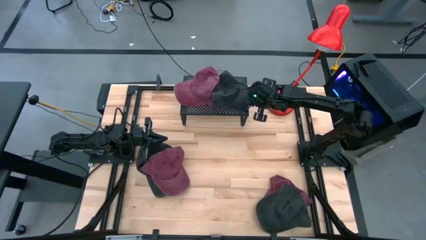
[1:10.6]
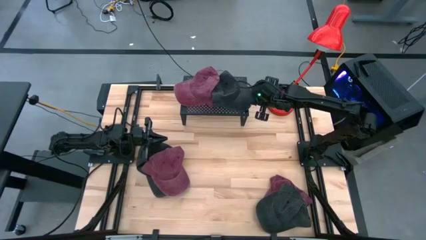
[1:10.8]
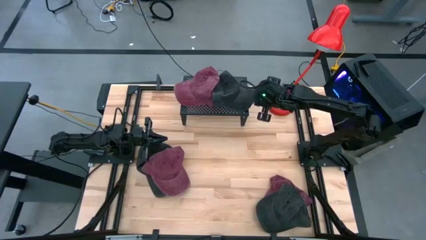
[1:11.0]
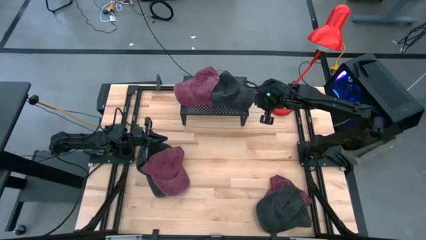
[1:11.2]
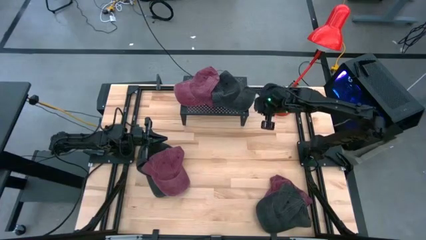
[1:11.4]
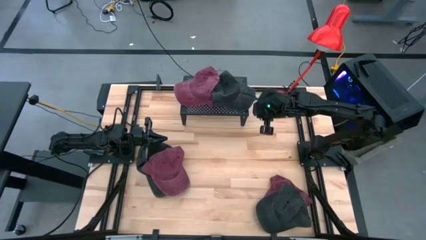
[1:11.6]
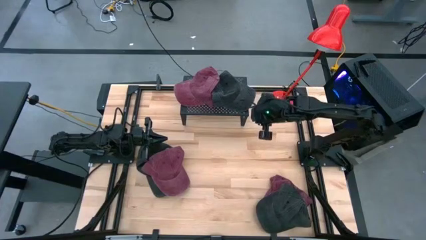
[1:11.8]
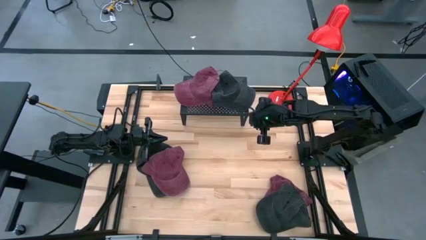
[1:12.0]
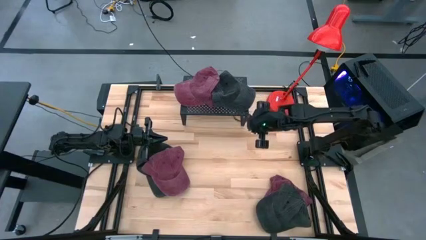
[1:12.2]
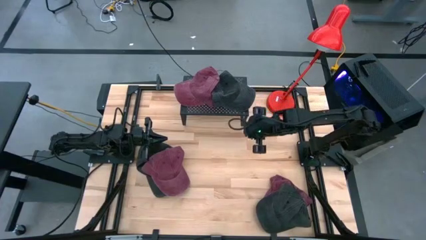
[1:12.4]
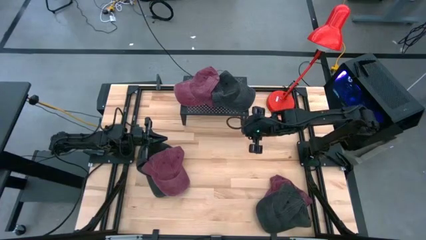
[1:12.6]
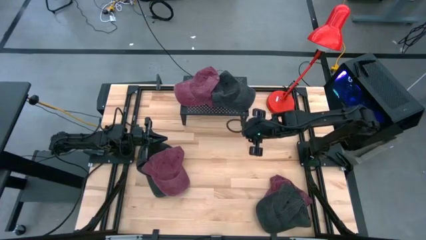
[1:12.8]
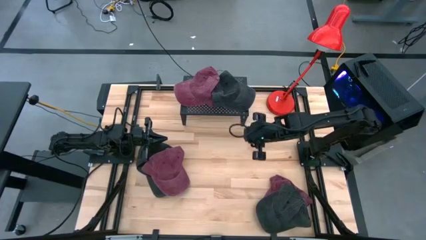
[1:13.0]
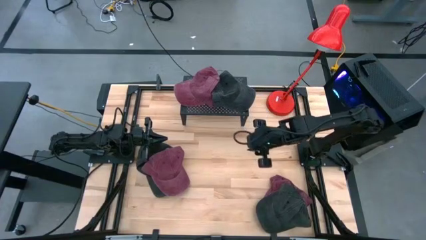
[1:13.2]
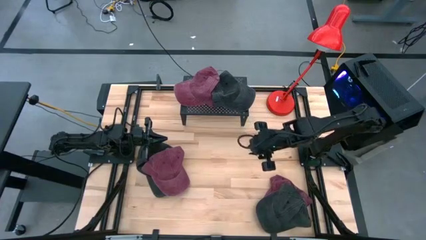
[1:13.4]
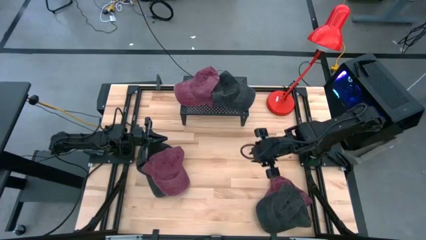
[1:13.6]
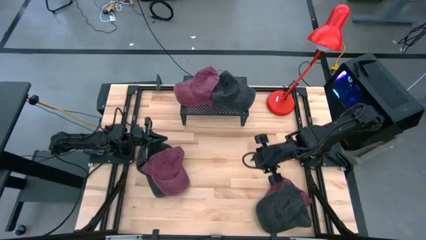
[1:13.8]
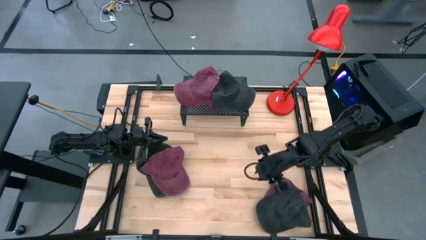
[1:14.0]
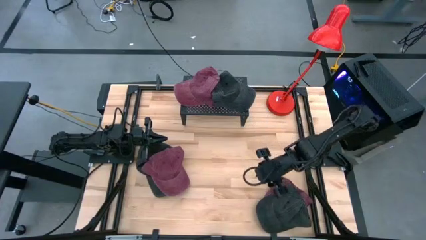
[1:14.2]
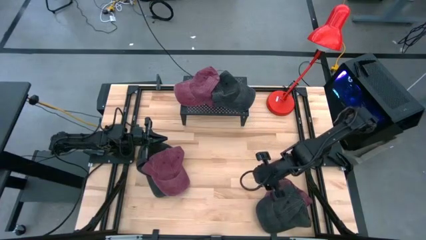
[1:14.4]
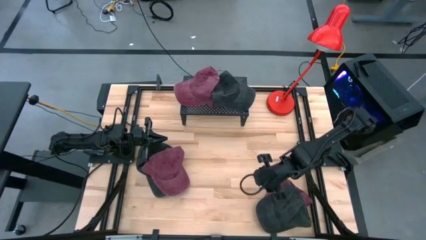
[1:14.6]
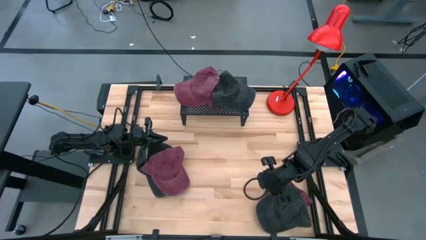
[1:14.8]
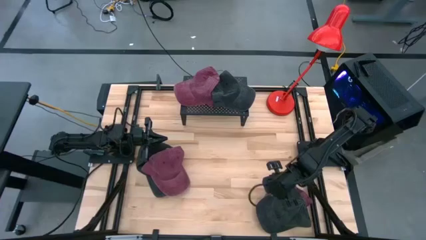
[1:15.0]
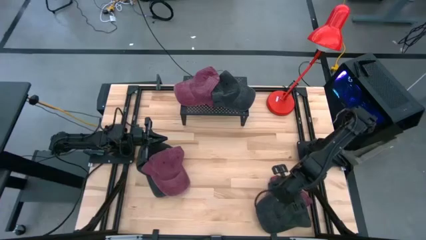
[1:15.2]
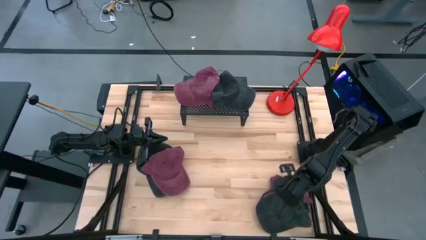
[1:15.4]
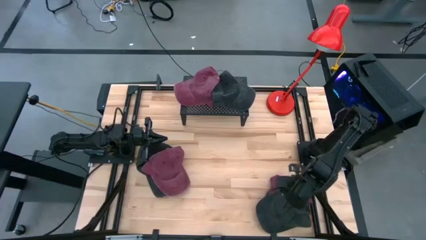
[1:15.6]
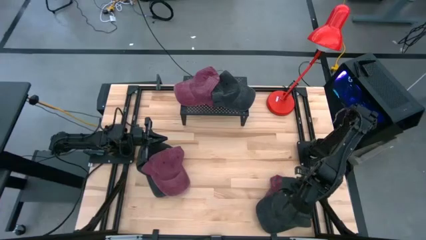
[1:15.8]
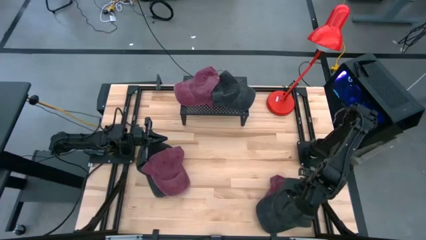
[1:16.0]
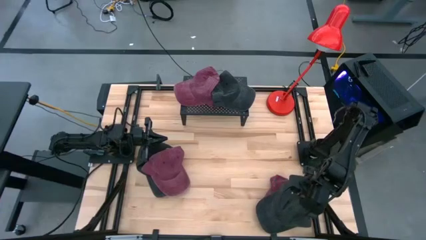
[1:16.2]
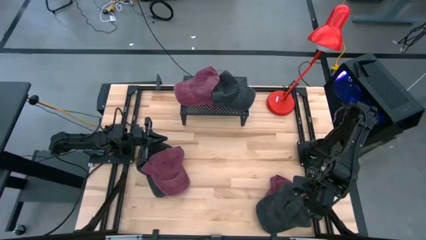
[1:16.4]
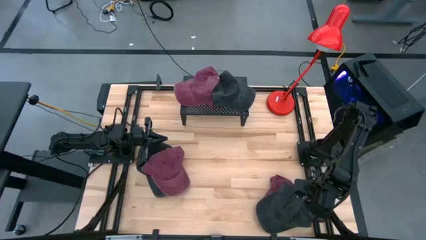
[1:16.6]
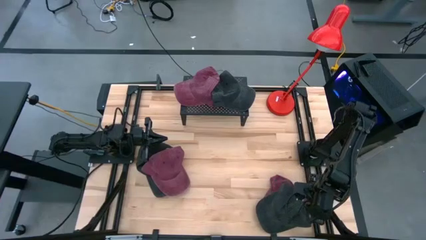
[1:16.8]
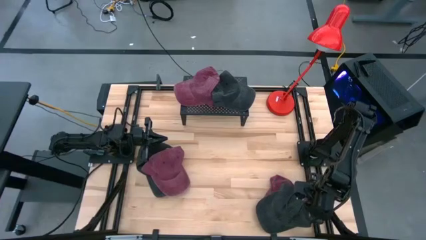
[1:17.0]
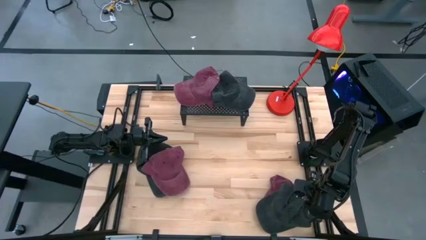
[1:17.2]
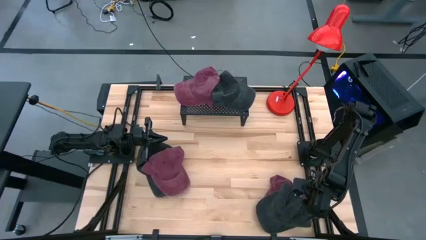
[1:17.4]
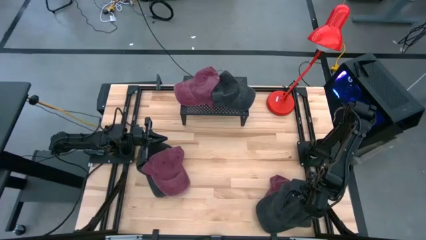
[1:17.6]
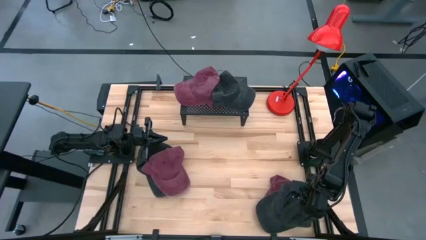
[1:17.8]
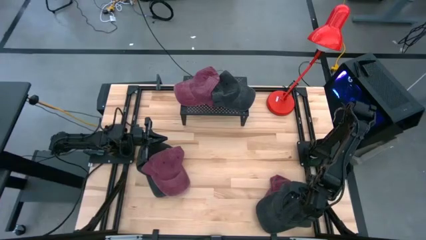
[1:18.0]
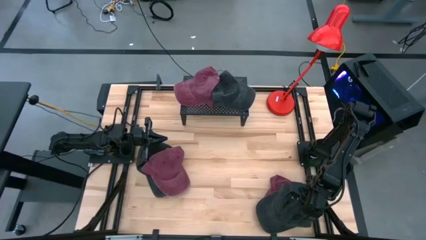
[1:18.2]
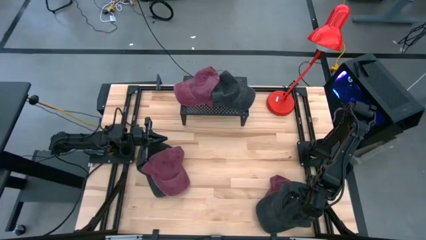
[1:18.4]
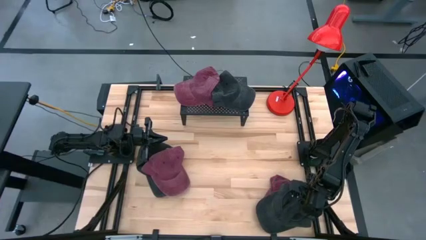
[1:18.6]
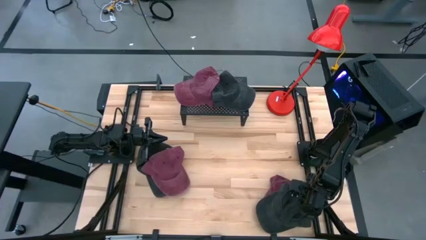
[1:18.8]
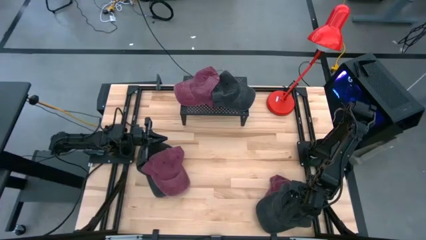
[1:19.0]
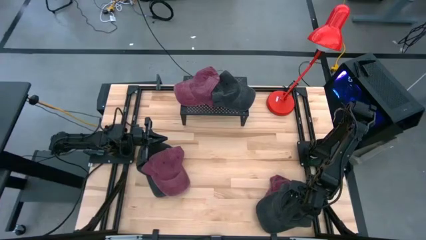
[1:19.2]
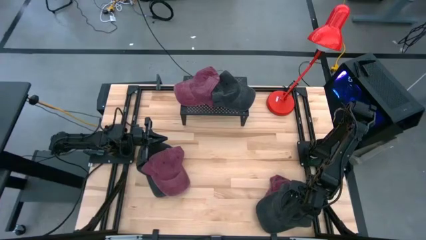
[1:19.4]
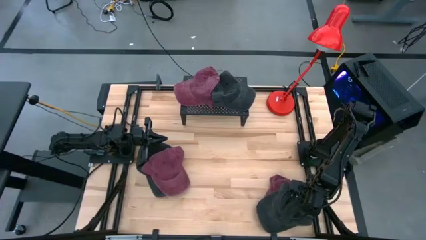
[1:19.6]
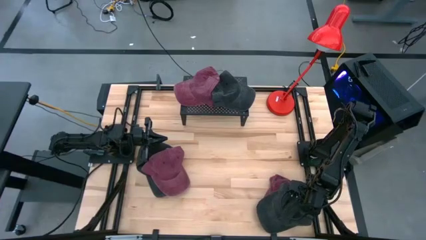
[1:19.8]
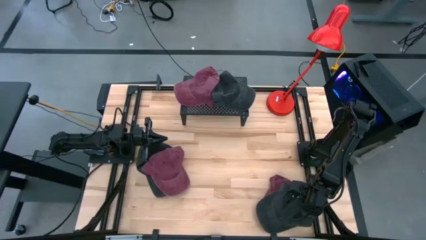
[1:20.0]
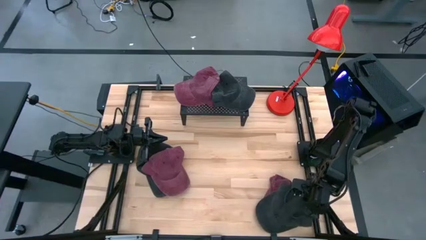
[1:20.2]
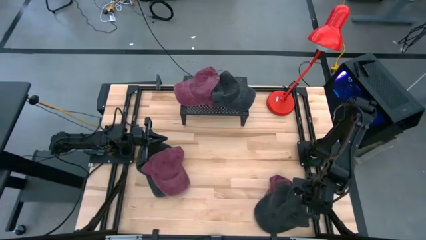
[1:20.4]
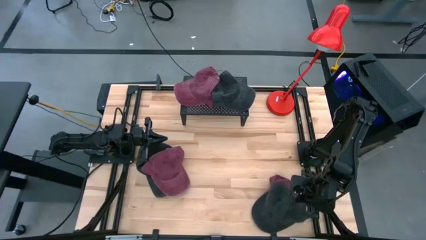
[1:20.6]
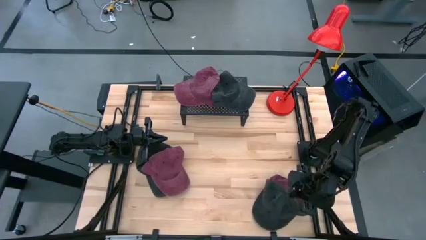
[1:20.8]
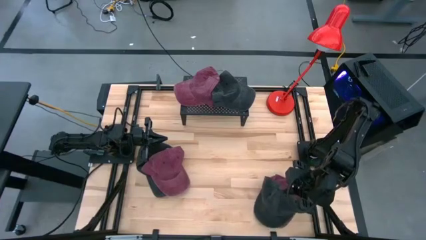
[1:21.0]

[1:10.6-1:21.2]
Task: Pick & Place hat
Move the right black cap

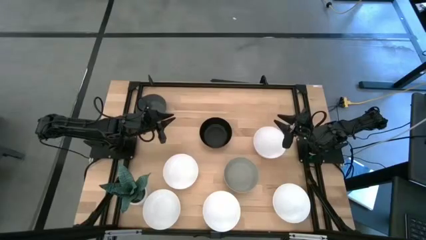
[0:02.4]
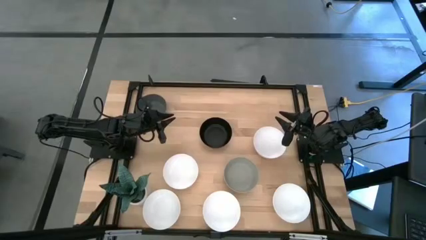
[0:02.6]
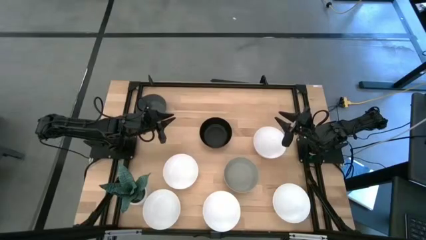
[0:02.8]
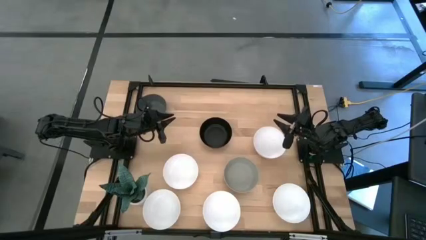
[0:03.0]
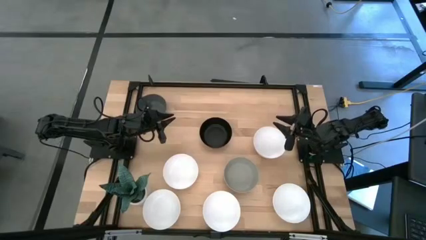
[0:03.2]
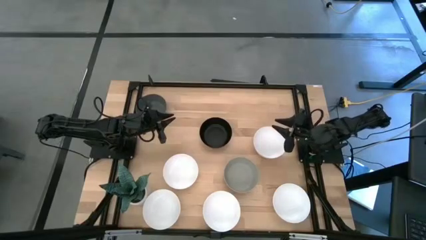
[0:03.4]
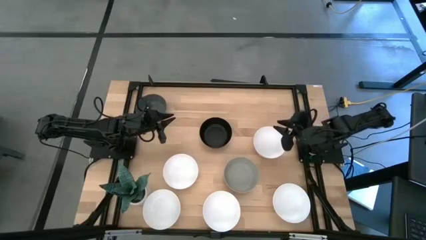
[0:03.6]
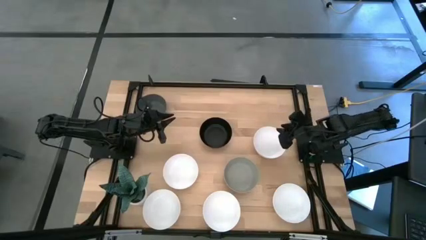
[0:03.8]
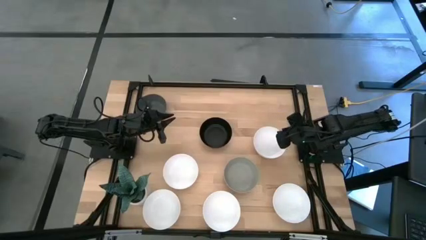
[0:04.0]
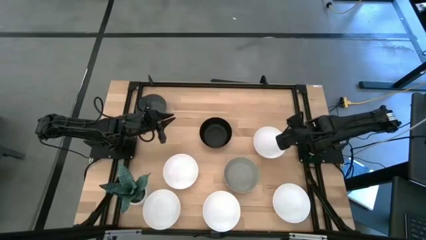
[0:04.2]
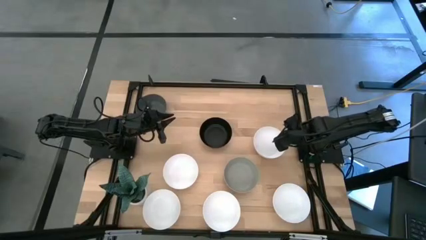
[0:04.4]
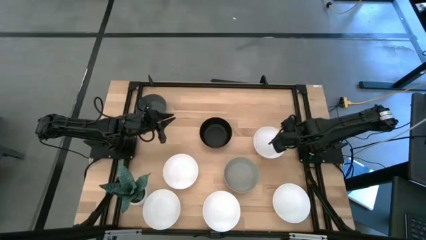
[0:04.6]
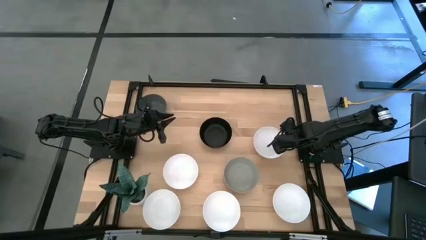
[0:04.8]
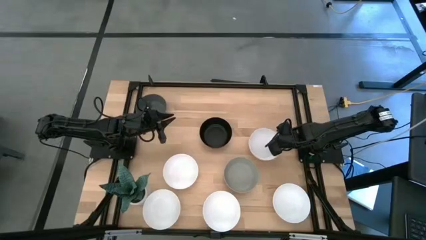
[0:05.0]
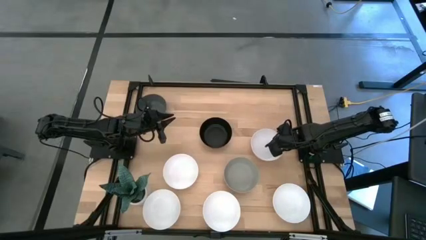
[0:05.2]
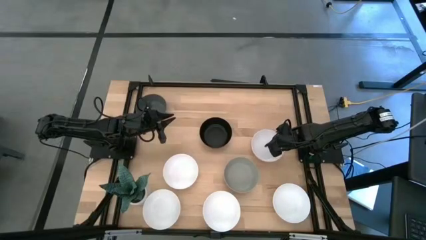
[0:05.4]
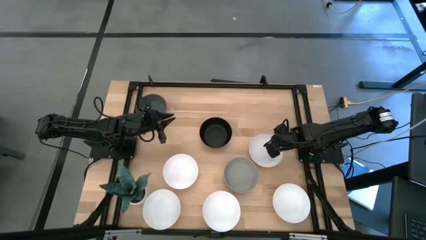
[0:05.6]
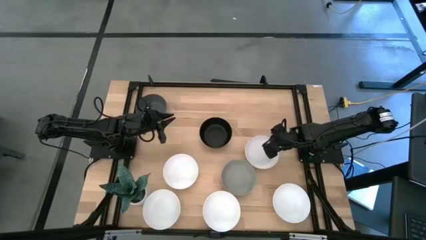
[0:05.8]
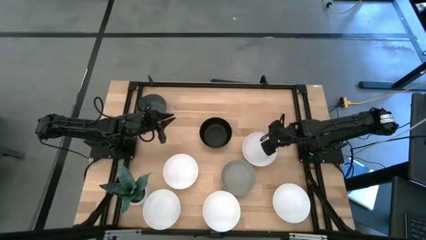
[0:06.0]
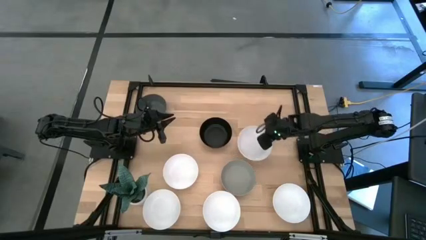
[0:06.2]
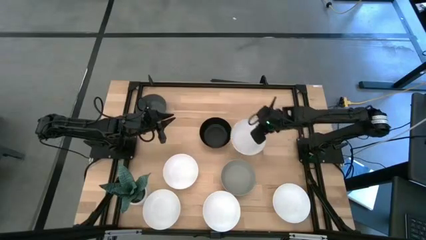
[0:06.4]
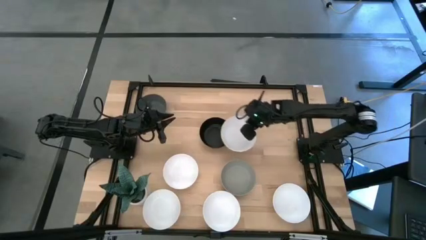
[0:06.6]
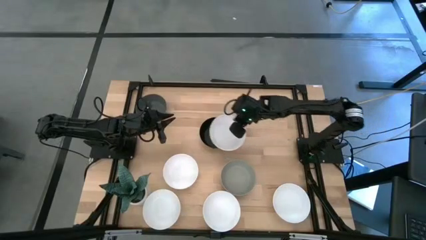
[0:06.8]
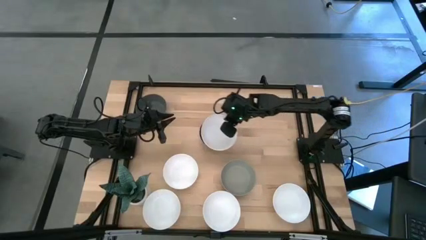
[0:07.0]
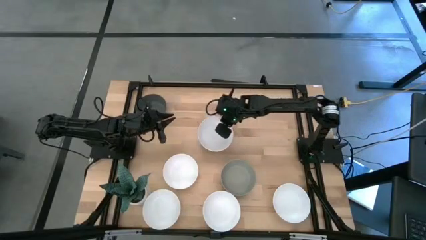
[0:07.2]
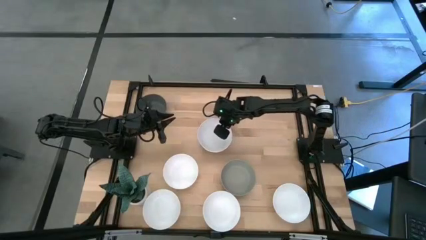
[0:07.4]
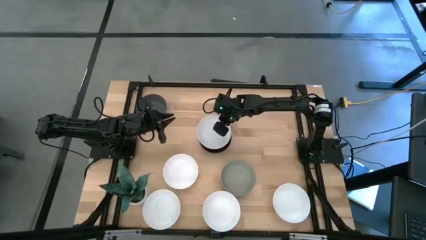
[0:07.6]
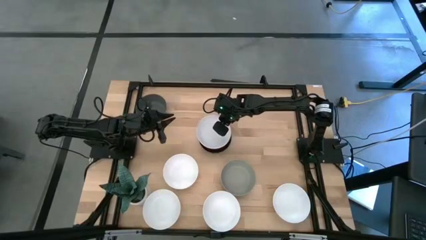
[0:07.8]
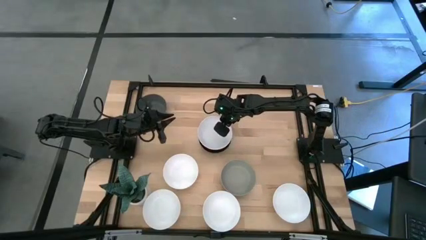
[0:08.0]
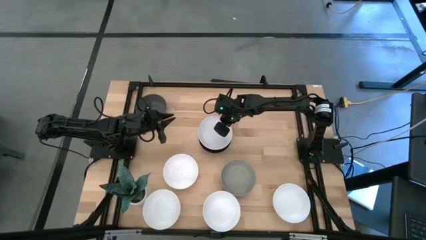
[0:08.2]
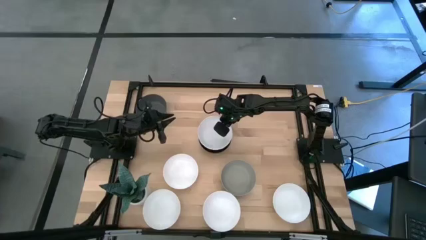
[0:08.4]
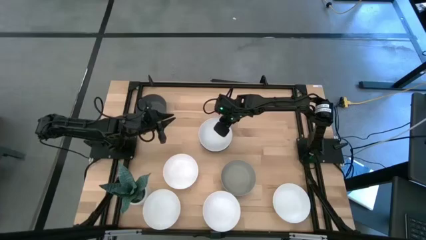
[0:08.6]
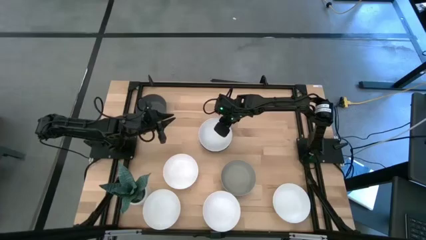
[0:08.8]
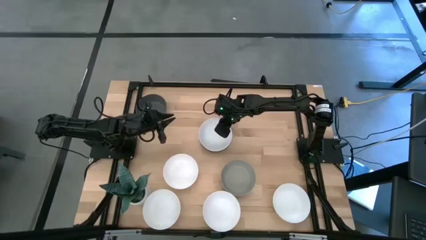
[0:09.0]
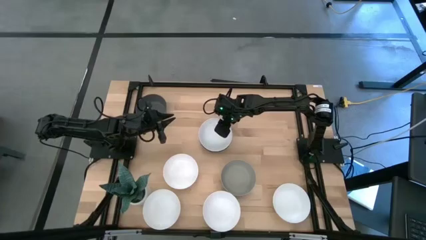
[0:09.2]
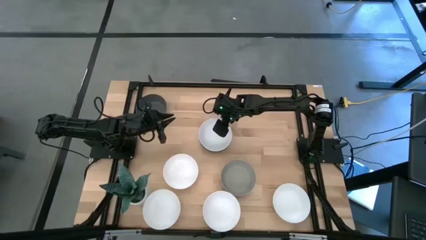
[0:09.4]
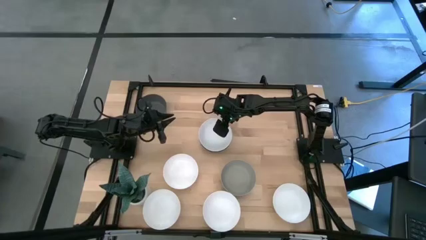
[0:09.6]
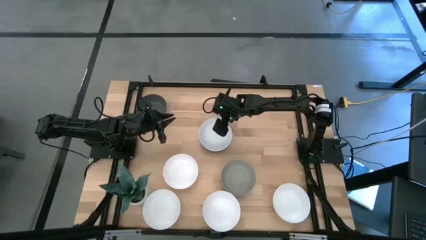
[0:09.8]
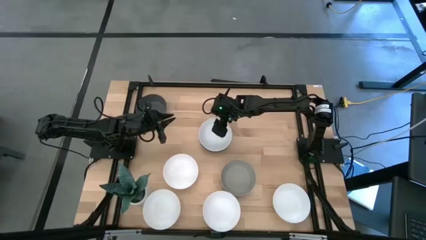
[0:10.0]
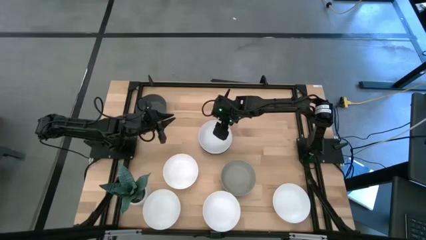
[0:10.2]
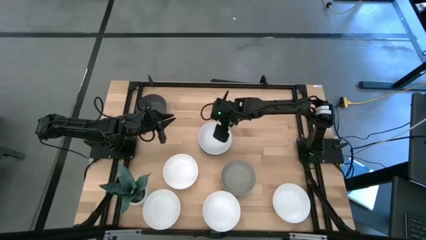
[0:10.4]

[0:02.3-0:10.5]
Task: Nest bowls inside each other
Stack the white bowl on top of the black bowl
